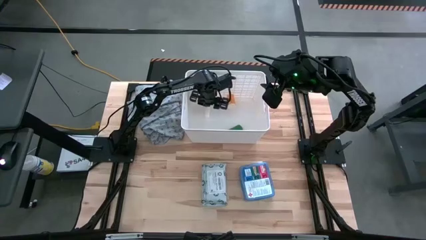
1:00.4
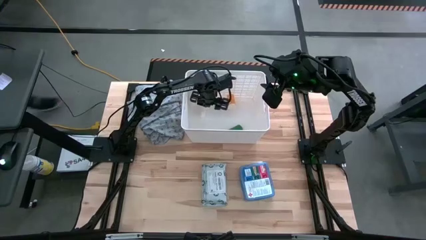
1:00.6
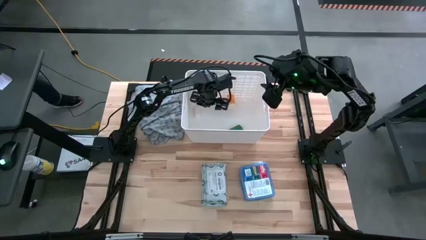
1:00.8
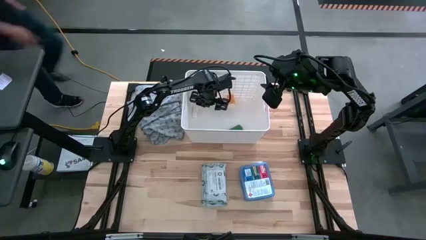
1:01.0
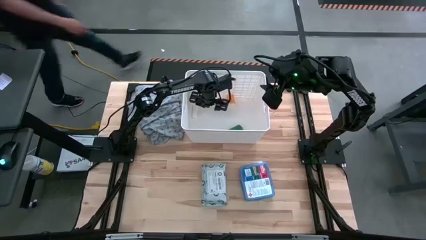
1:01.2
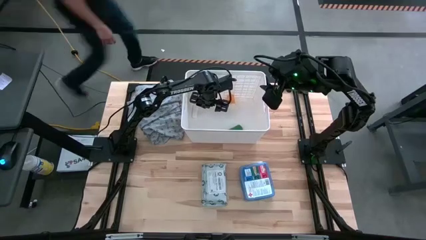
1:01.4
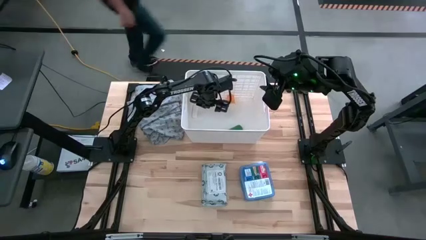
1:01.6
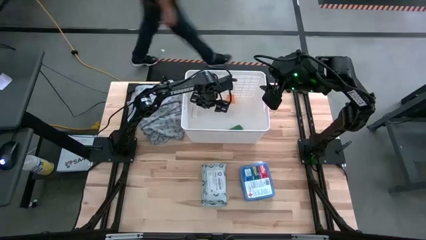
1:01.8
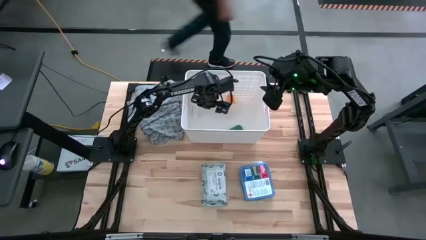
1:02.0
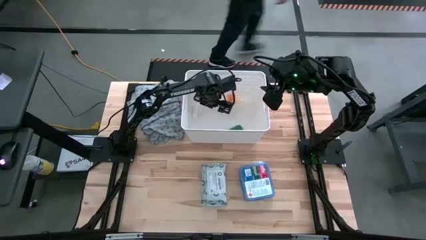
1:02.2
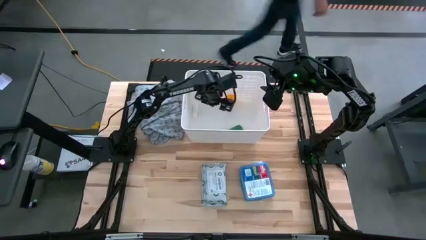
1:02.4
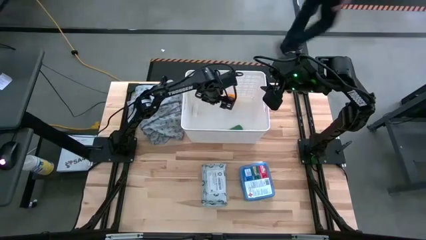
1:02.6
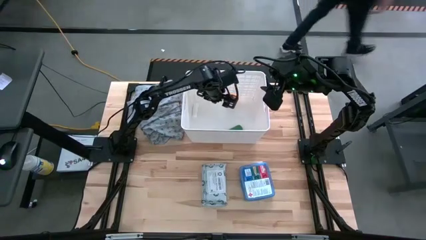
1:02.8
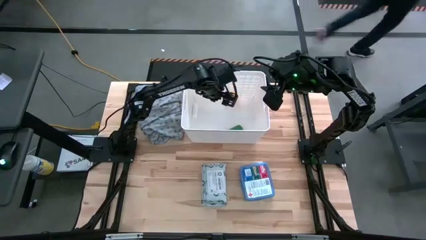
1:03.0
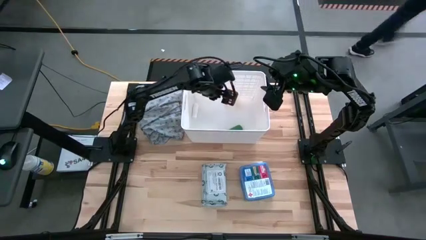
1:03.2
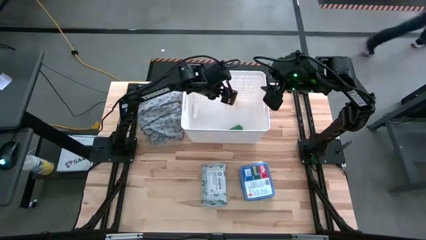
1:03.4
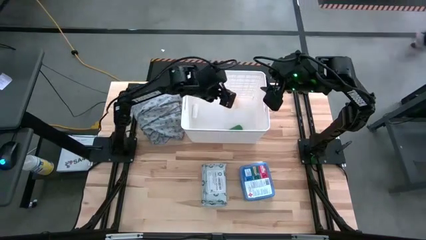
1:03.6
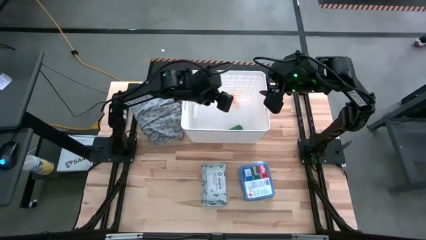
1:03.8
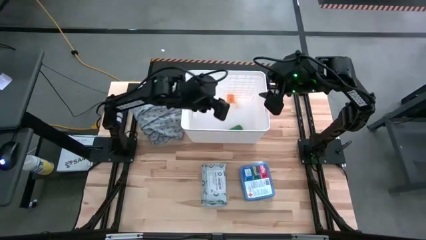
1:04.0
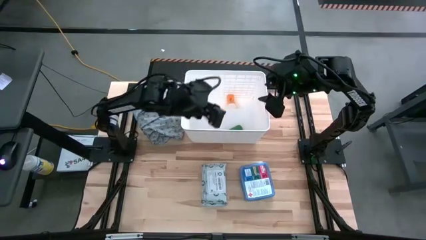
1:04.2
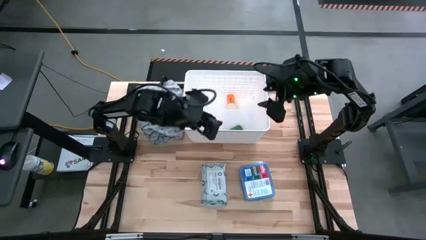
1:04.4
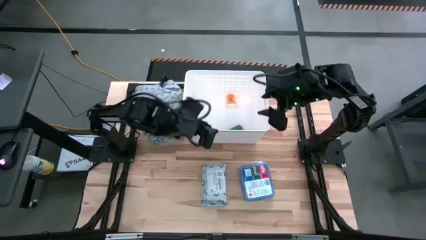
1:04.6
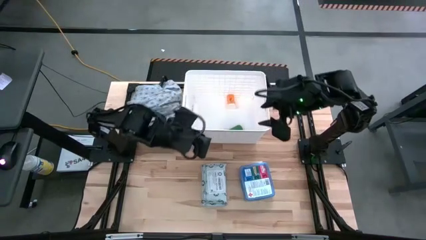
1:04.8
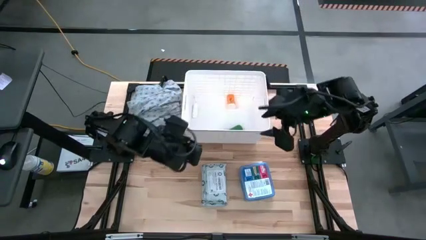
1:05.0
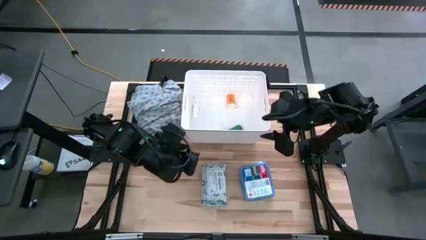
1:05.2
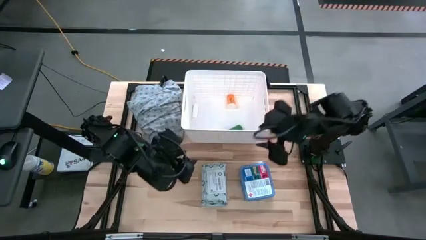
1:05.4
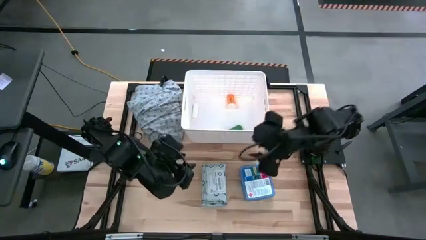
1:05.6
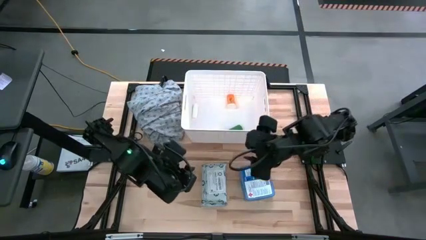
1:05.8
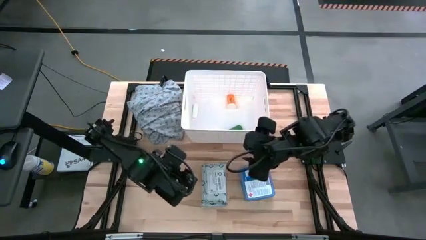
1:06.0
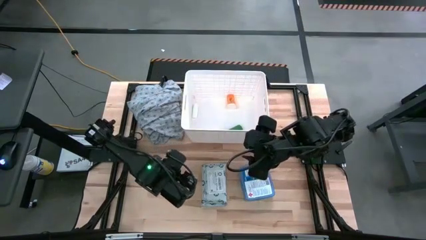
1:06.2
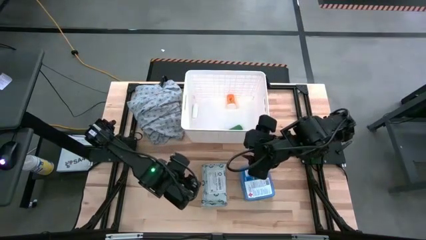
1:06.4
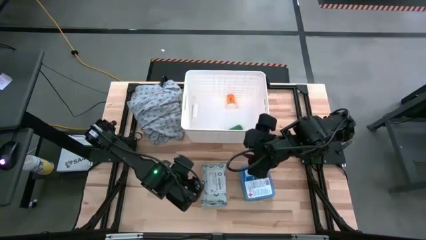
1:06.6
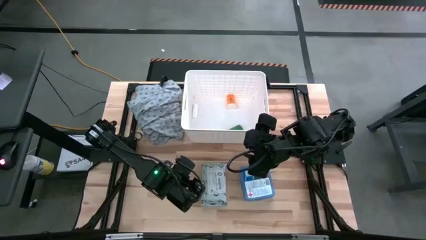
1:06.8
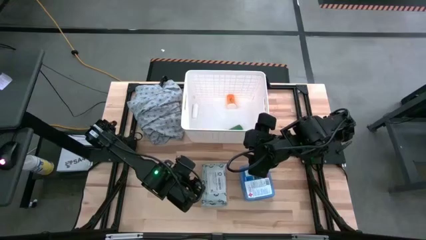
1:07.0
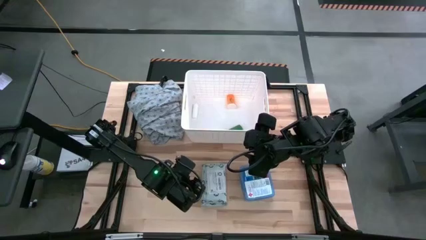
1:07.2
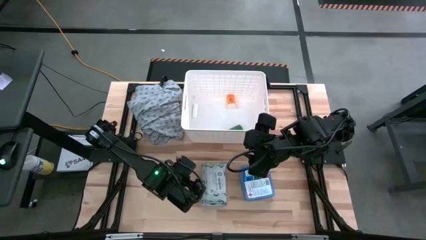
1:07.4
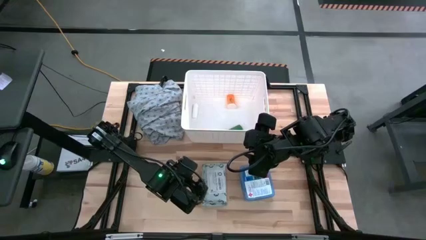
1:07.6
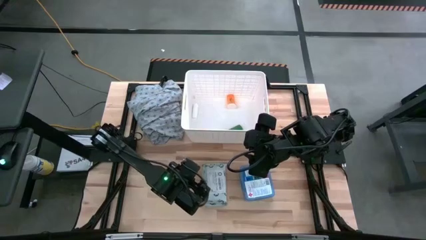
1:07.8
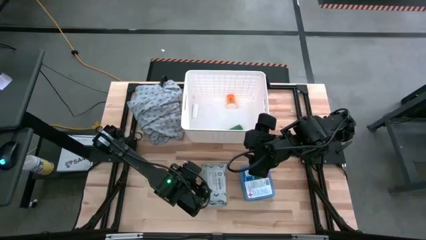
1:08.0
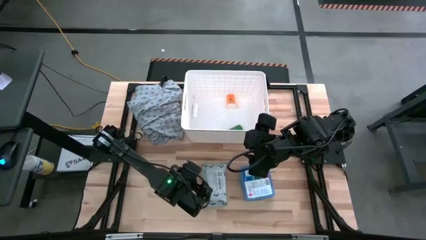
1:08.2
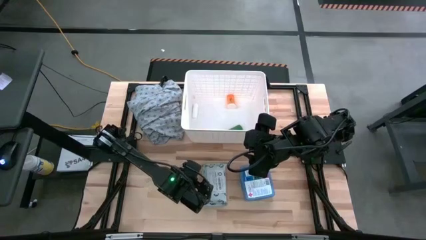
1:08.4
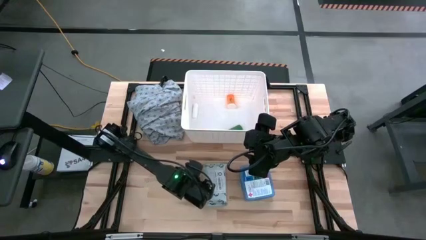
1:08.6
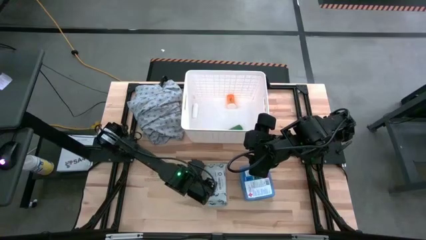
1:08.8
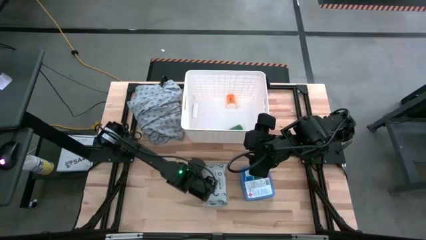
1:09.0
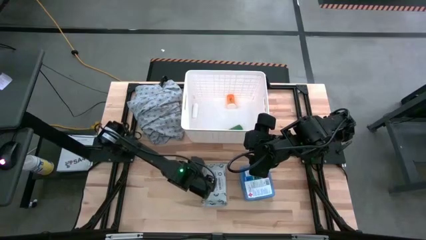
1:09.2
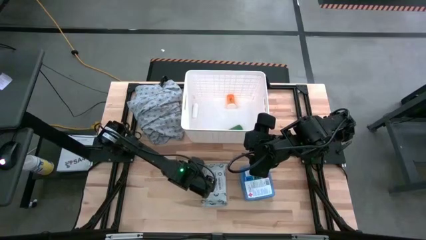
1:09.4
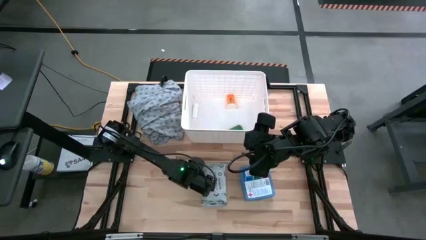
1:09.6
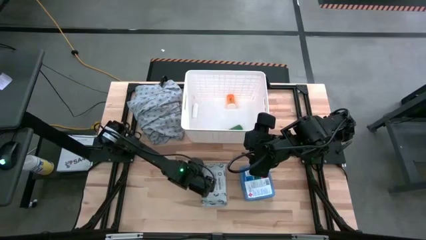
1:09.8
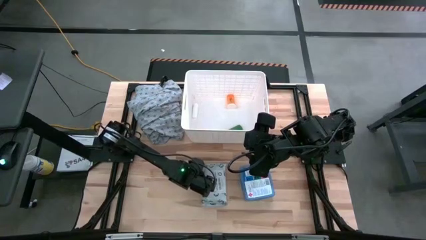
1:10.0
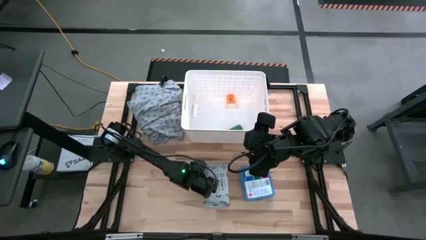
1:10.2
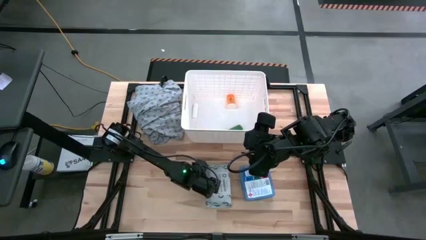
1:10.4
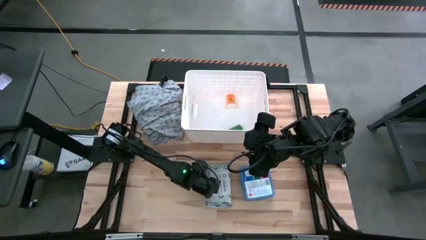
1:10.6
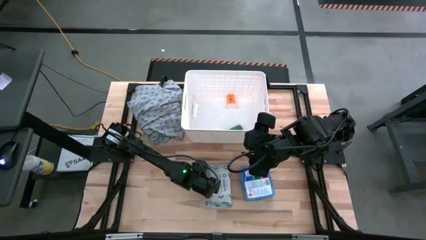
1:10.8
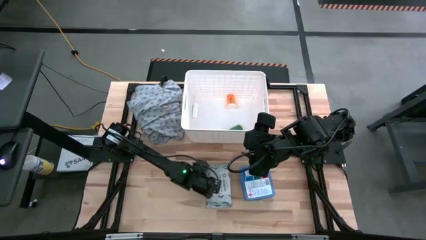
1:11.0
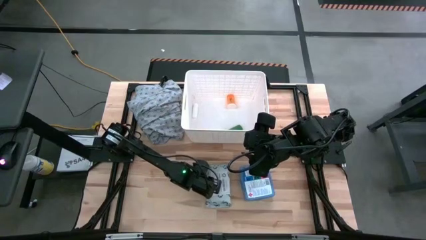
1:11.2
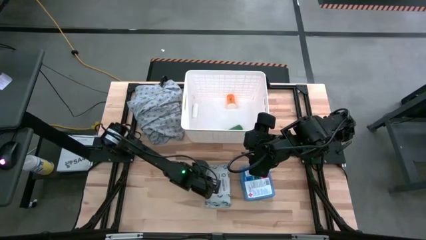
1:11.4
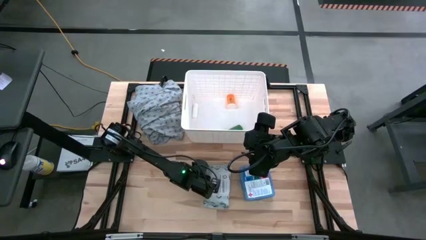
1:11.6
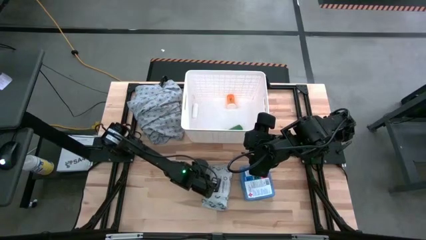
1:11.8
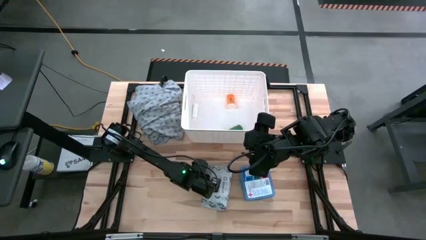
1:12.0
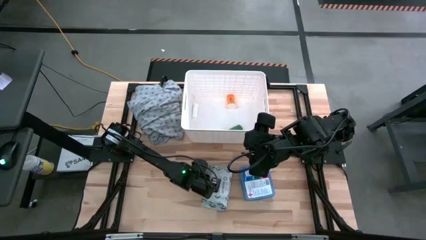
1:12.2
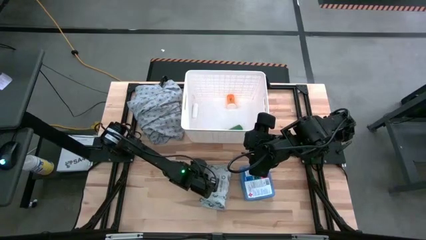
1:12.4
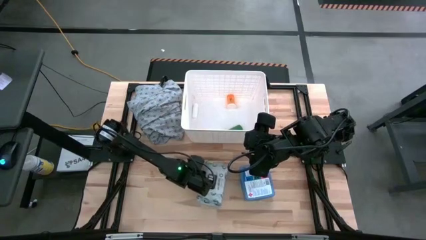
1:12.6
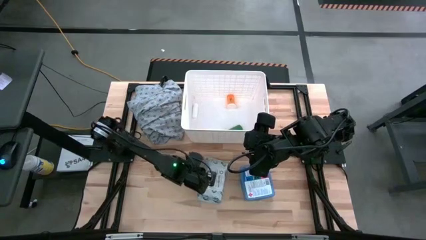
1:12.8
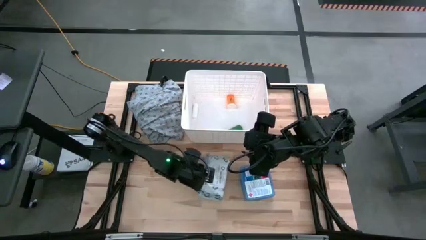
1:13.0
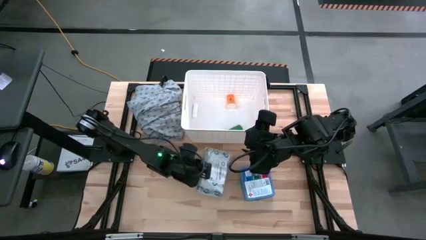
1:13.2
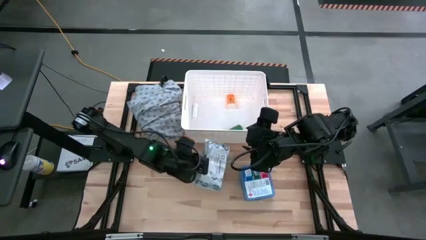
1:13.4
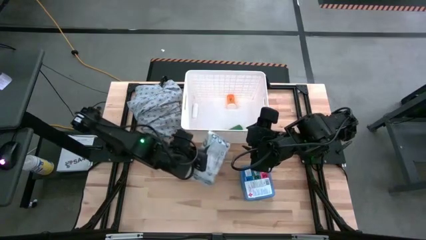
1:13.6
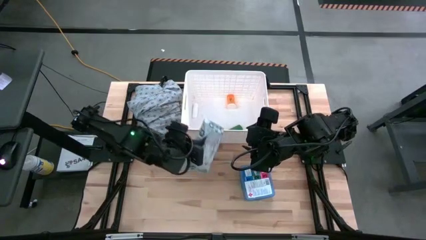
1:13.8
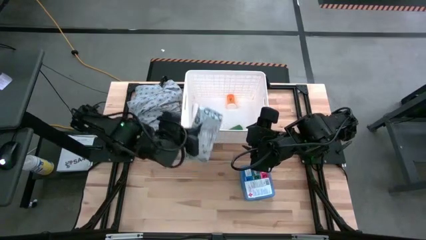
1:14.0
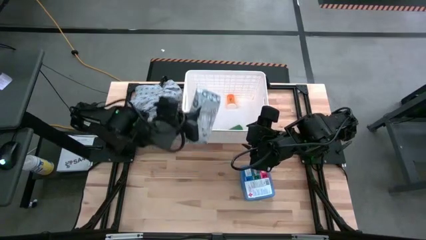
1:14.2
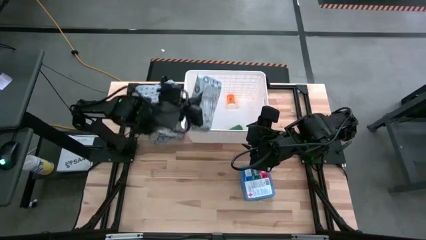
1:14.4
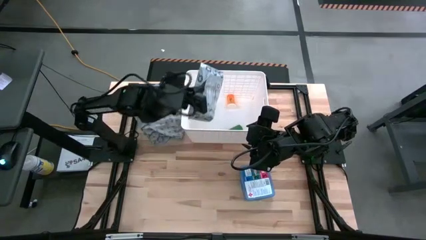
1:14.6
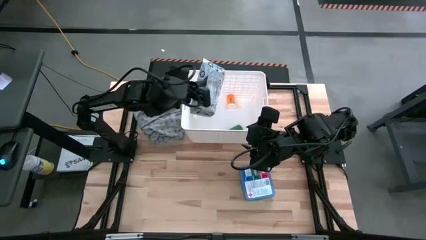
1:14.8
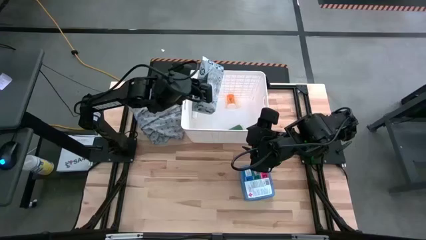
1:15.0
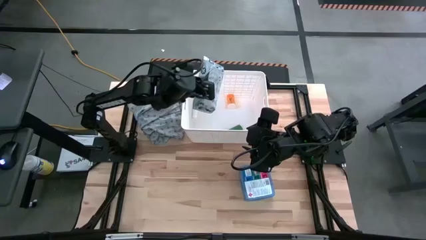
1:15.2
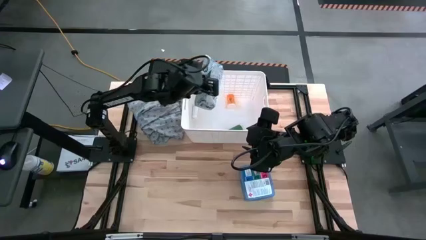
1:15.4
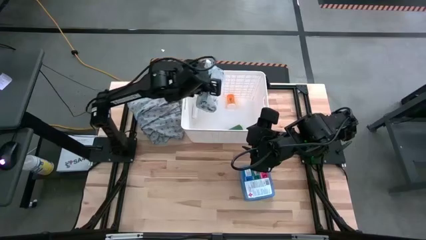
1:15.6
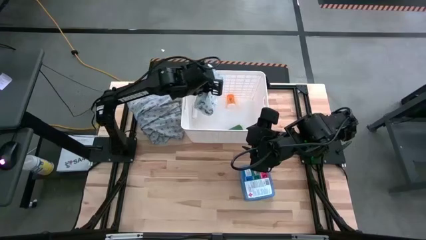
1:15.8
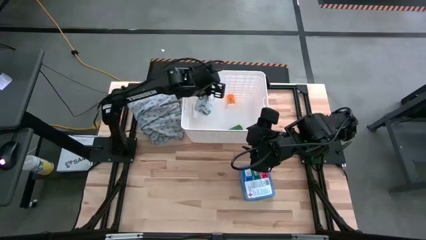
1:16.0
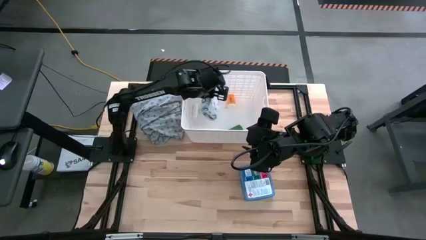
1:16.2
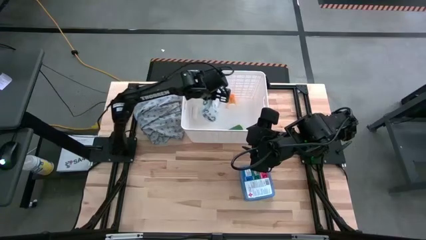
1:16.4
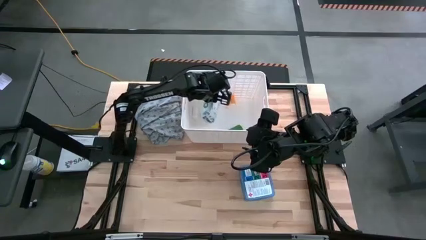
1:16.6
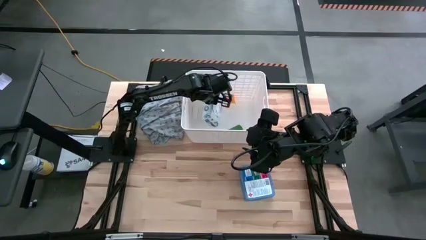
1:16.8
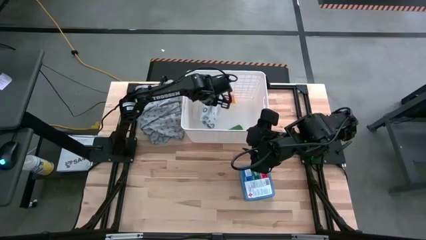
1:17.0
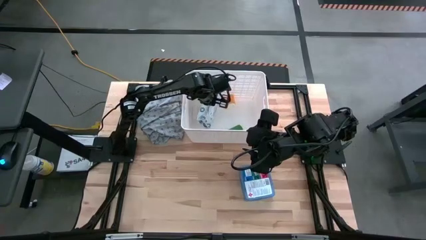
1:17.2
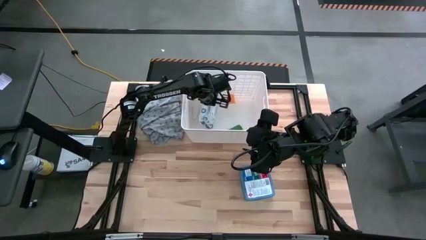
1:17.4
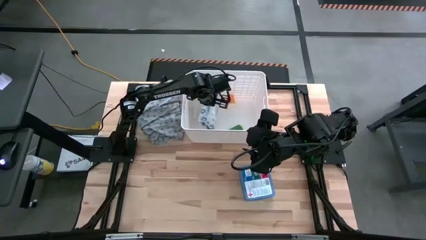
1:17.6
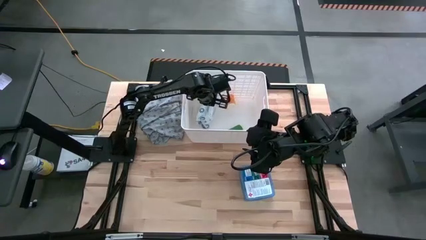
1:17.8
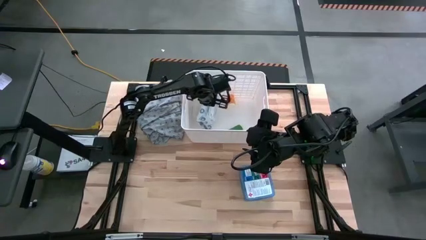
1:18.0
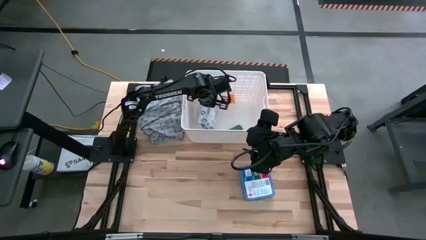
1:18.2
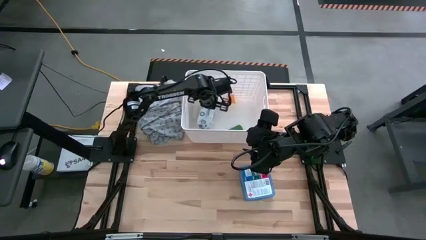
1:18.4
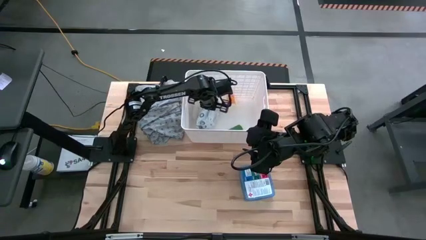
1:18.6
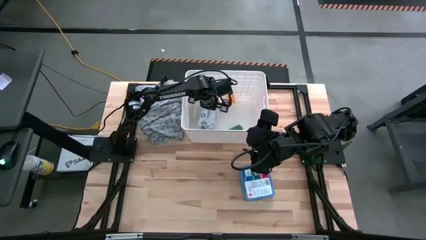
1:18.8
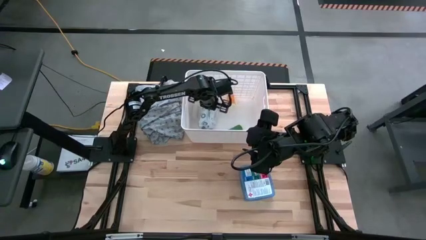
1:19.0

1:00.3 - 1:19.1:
Task: Pick & place medical supplies in basket/bin
Put the white mailer bag in the white bin
